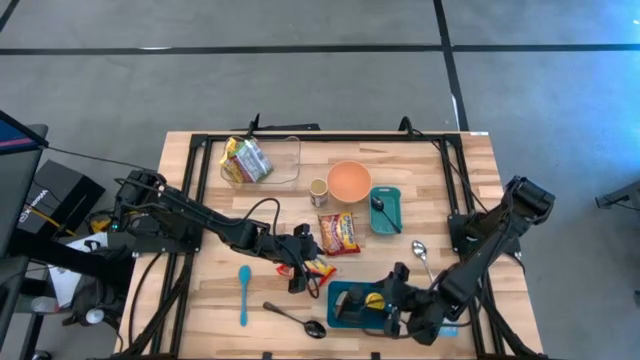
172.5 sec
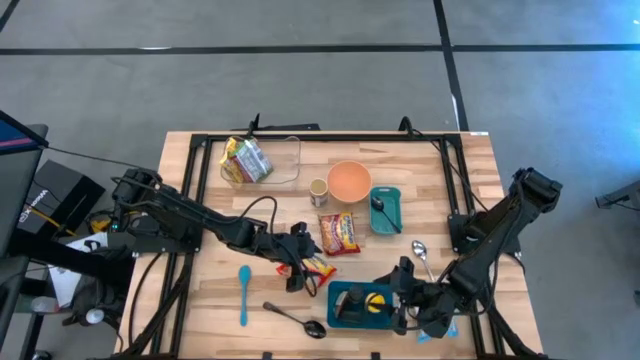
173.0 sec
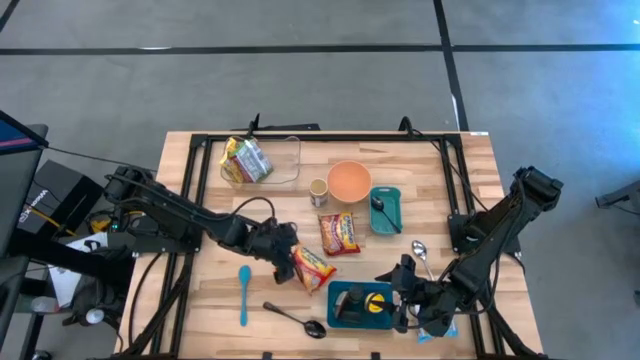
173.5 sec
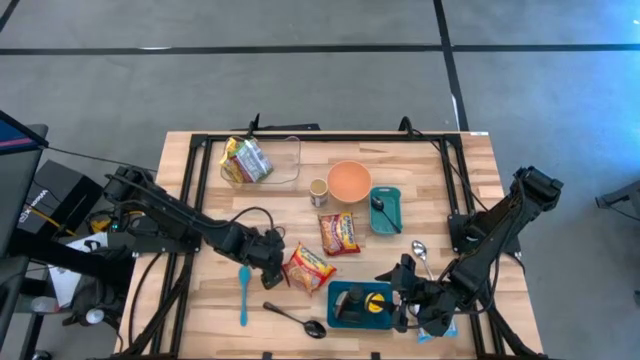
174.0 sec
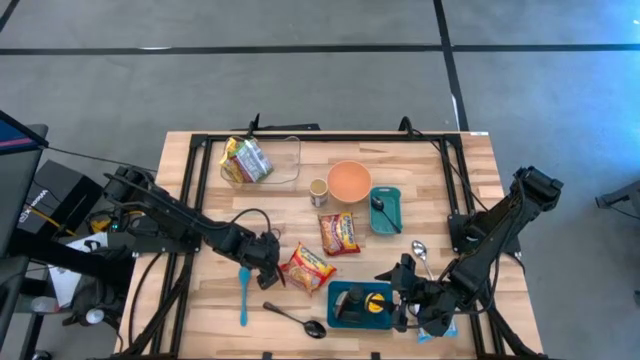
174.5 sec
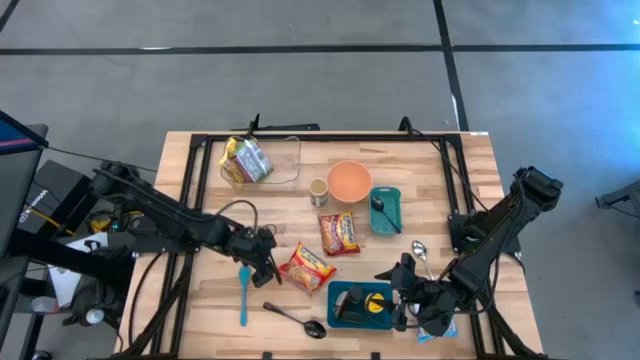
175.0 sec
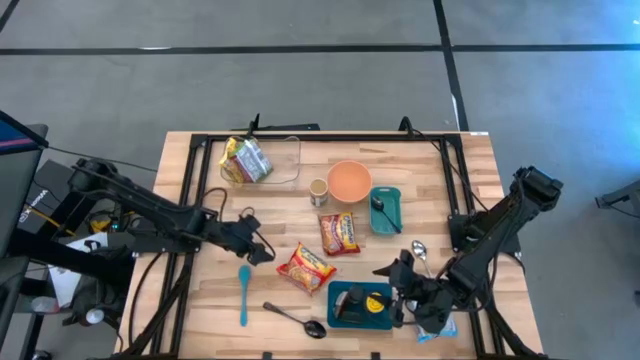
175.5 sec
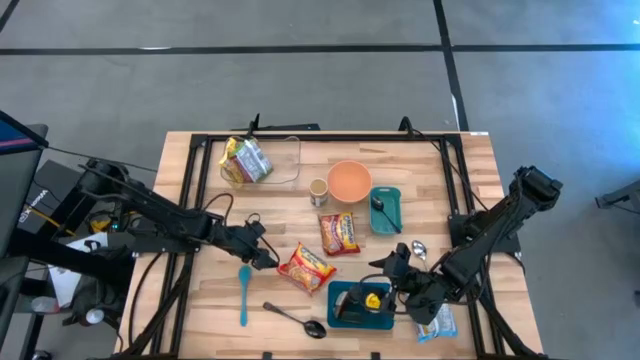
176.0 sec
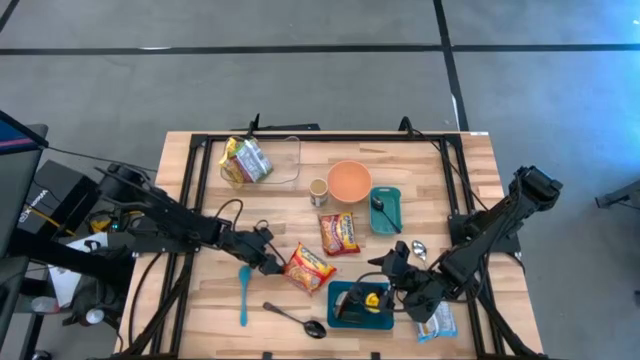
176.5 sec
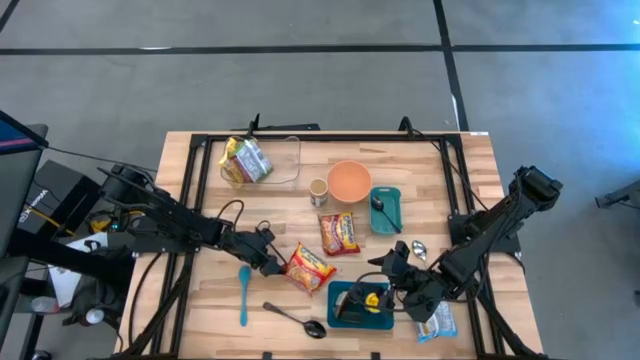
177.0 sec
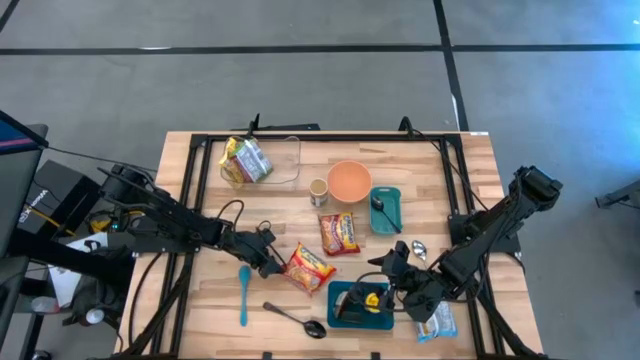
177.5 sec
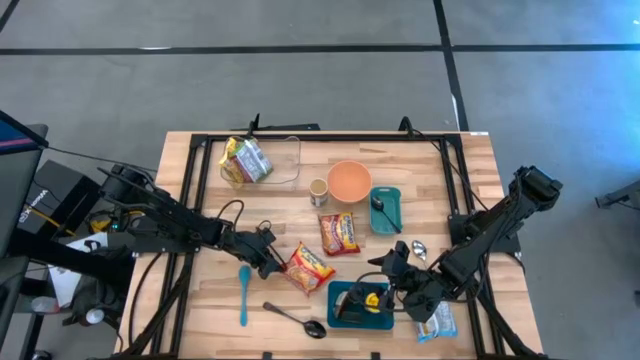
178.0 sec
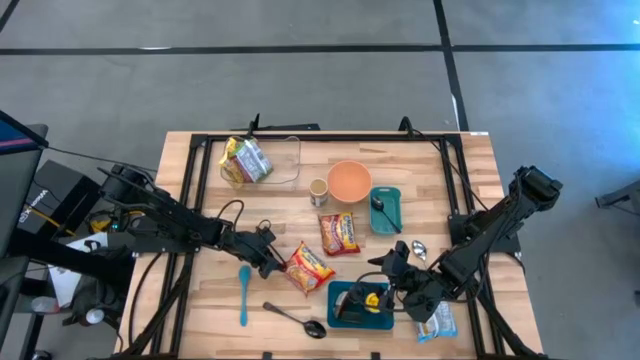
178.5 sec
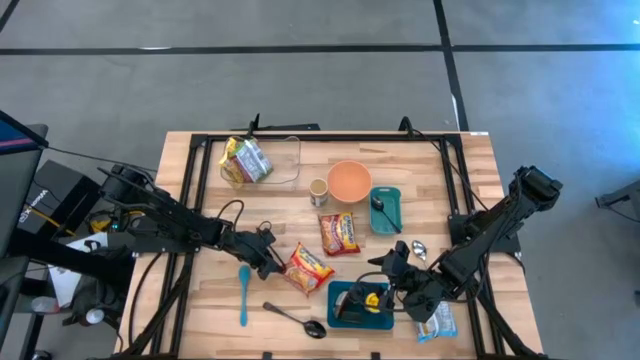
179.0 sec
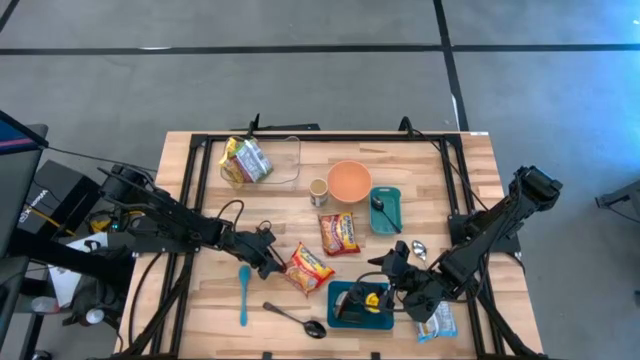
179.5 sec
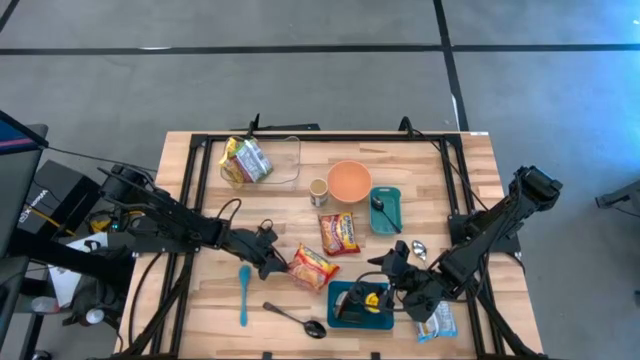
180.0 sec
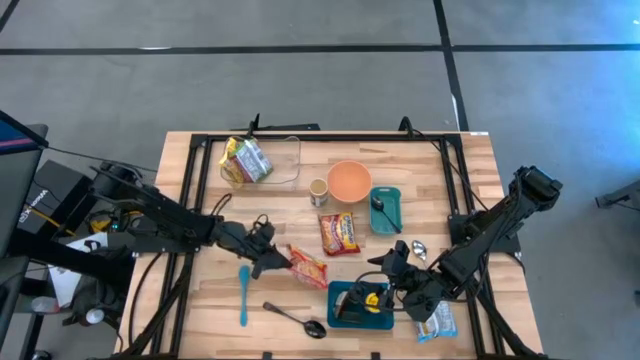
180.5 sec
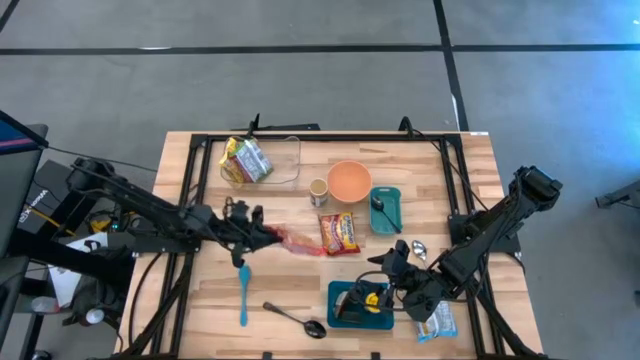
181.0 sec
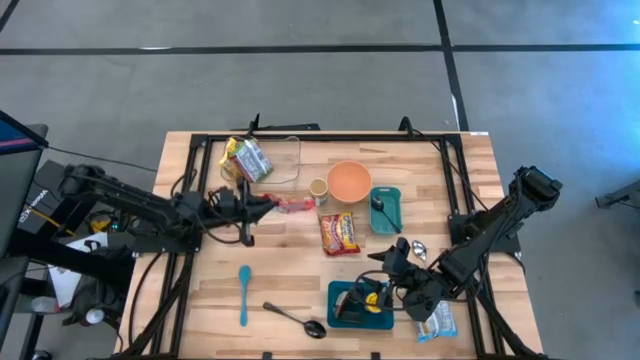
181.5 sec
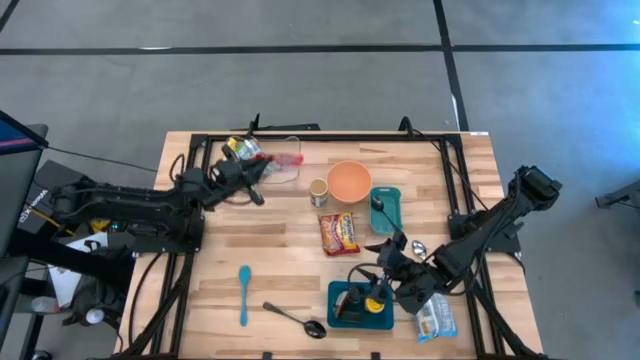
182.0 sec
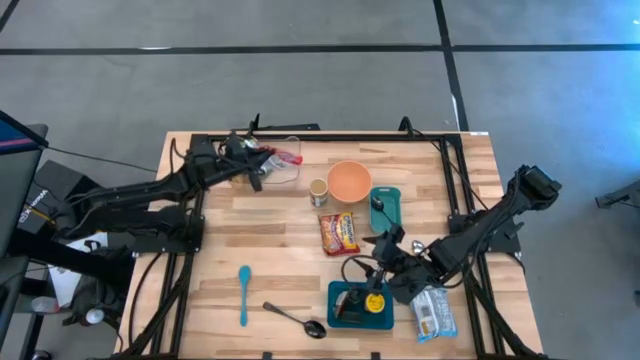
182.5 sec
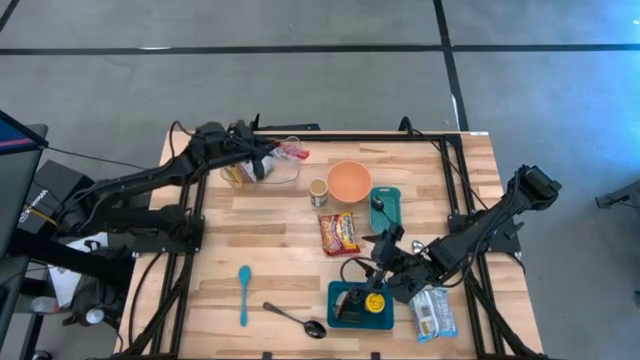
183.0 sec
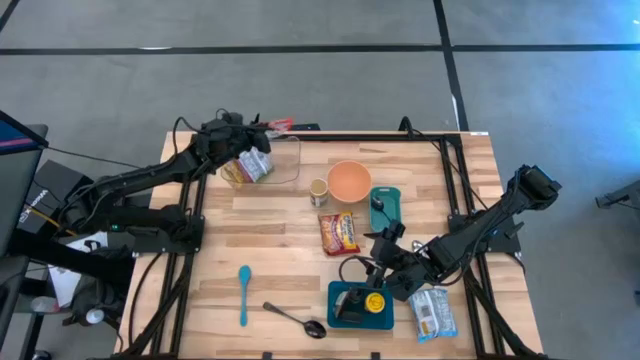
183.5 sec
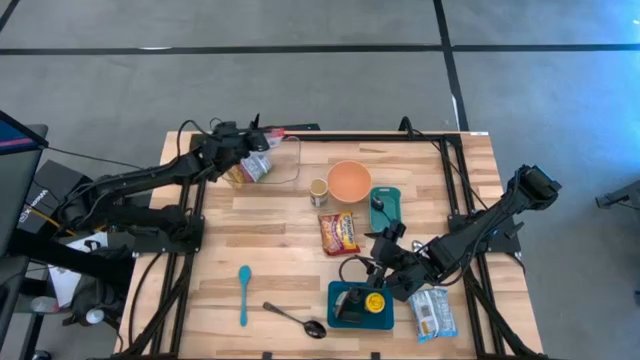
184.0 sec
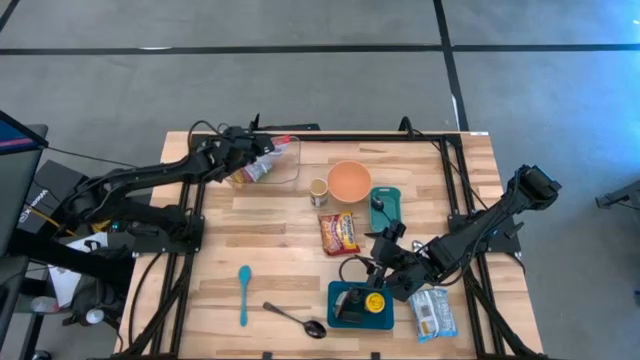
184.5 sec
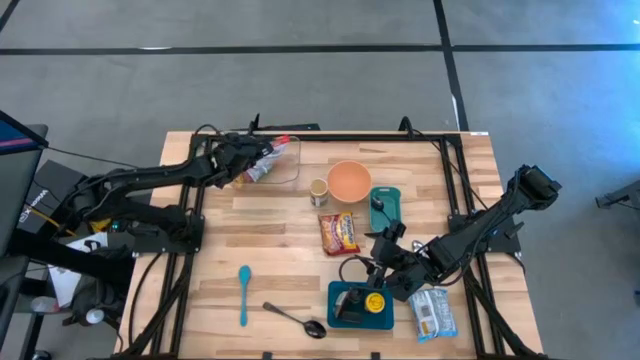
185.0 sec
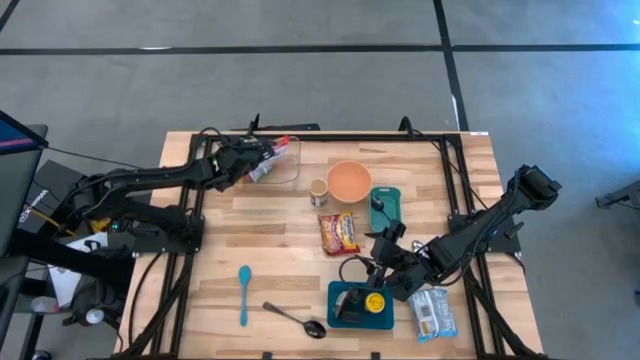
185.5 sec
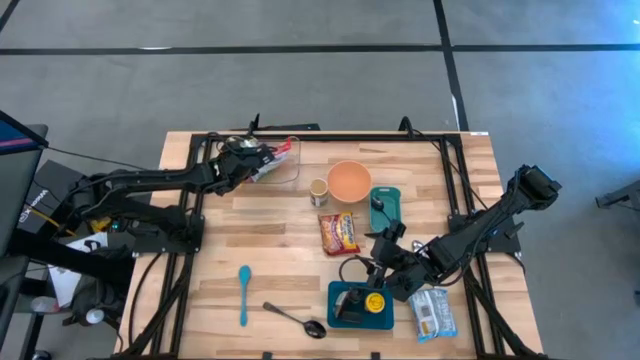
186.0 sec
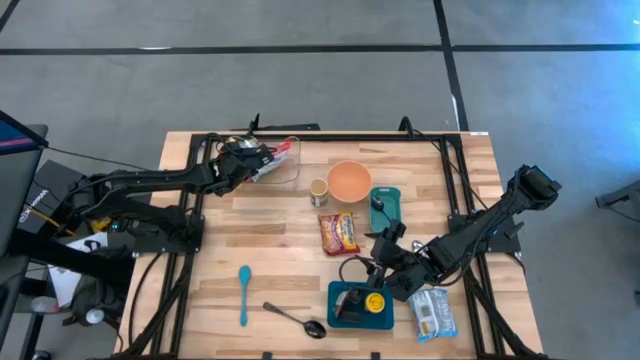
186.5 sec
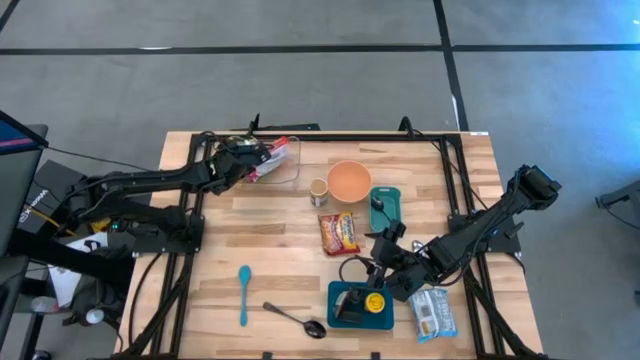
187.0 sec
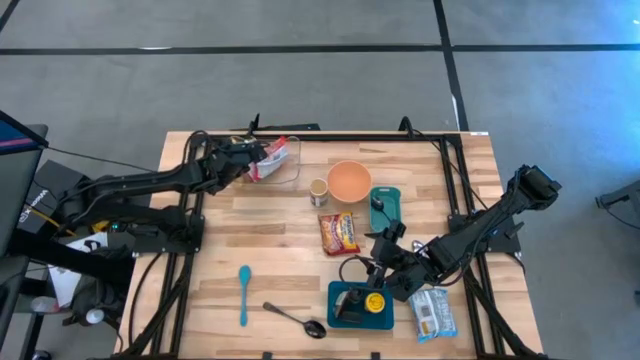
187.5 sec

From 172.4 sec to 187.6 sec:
Task: Pick & Place Food Item
Put the orange noodle pack into the transparent bin

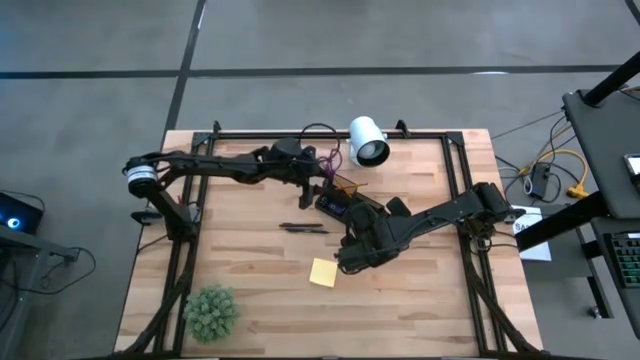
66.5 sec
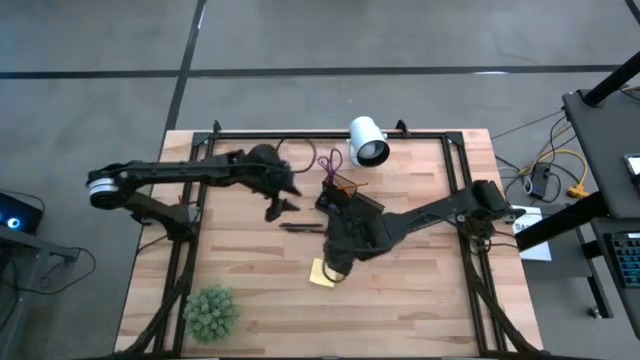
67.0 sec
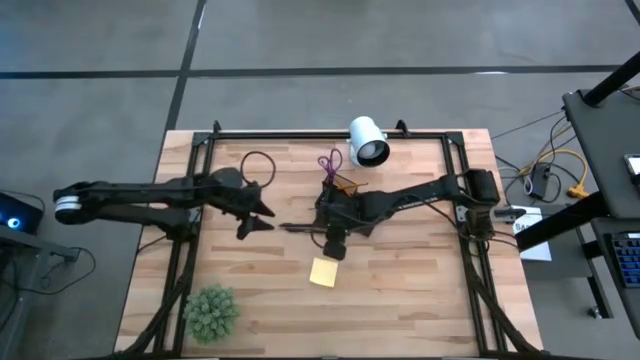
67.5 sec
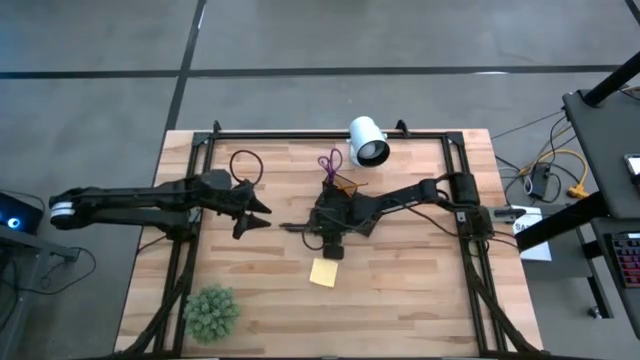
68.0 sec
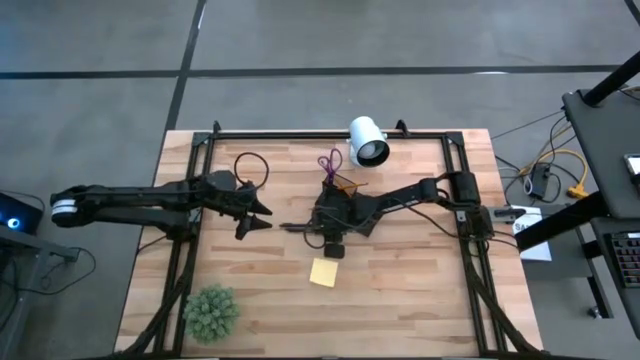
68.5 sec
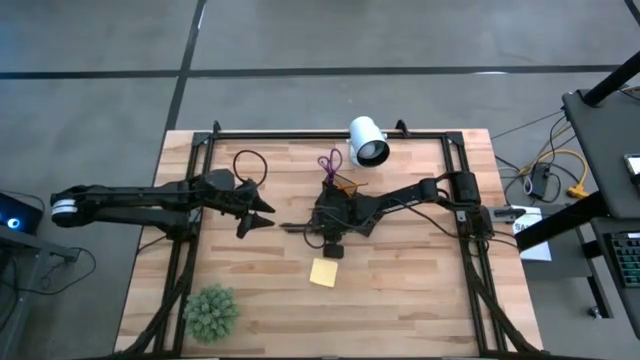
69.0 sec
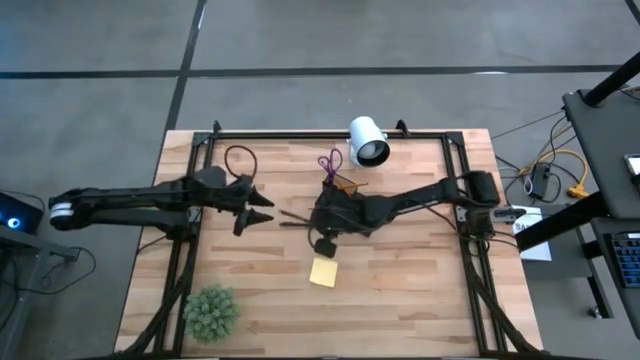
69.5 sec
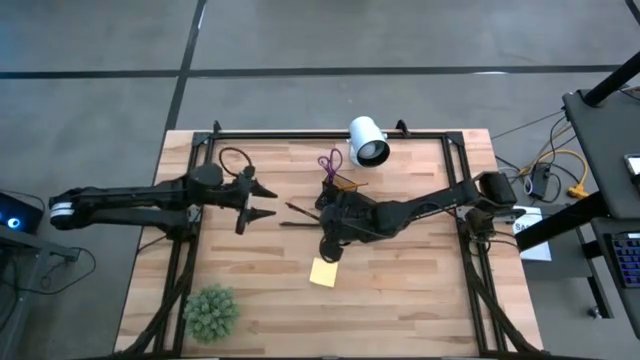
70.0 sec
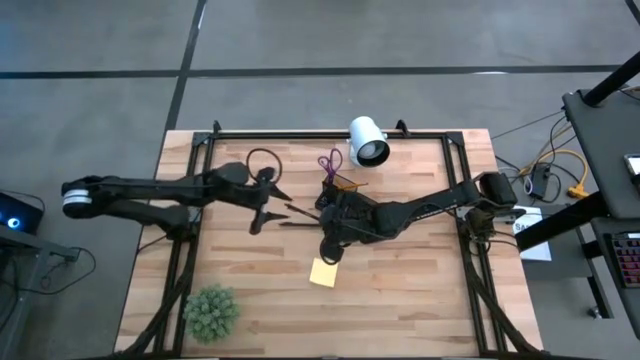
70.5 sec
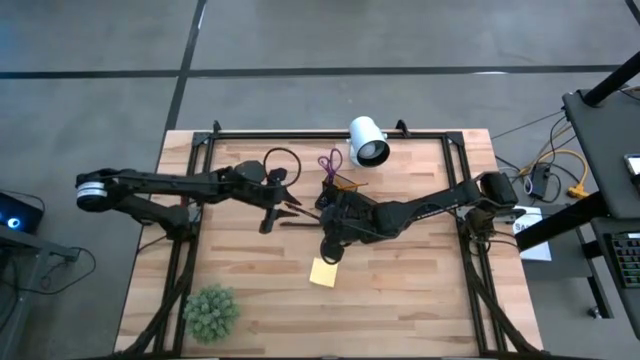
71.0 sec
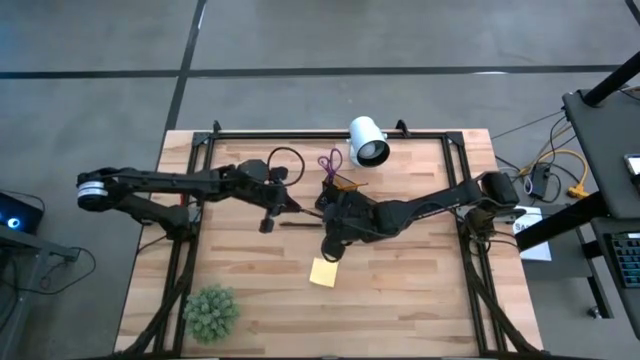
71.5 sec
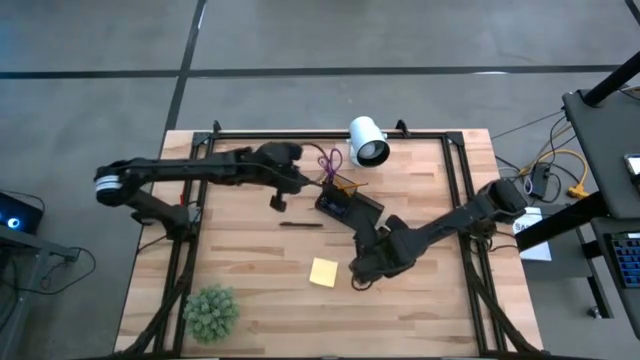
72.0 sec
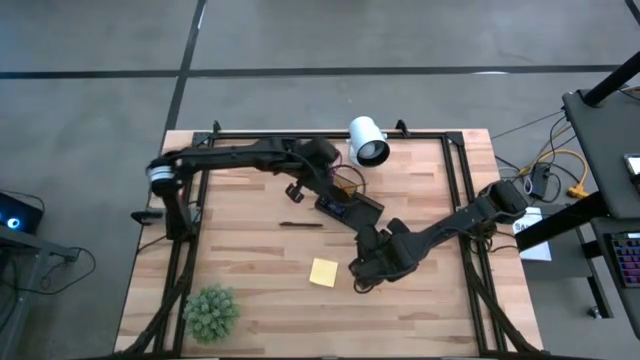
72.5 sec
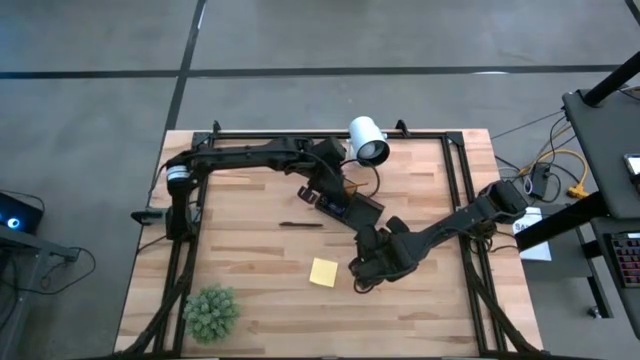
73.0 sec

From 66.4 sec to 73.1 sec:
Task: Pick and place office supplies into organizer
Put the bottom black pen into the black mesh organizer
